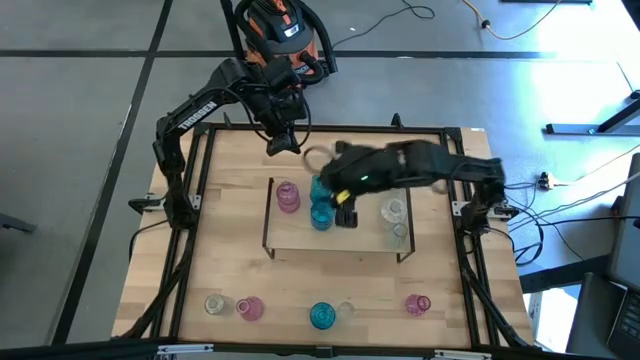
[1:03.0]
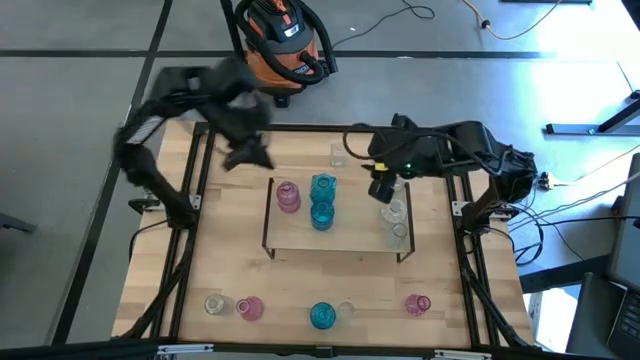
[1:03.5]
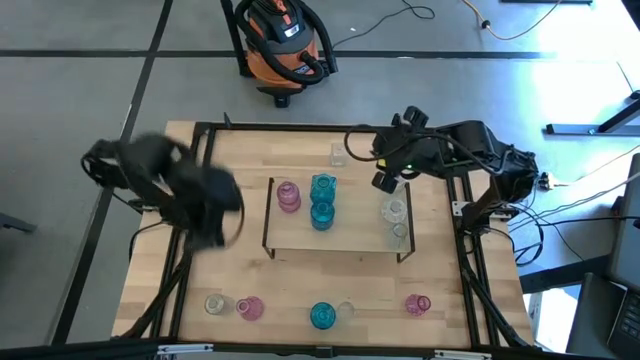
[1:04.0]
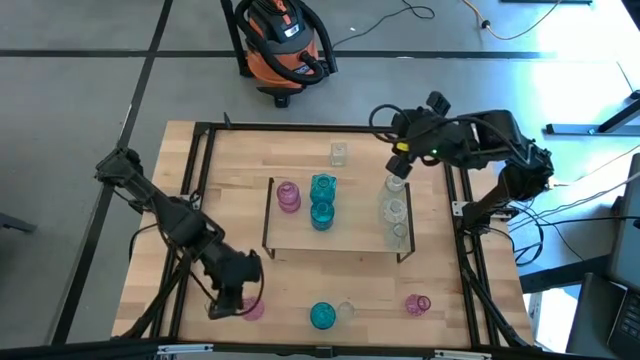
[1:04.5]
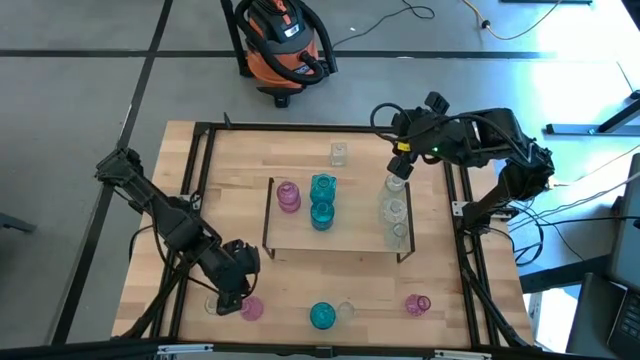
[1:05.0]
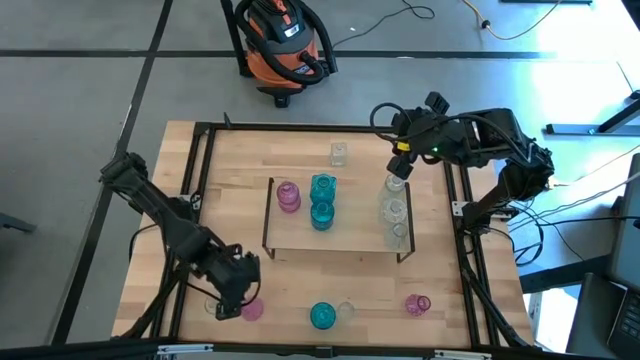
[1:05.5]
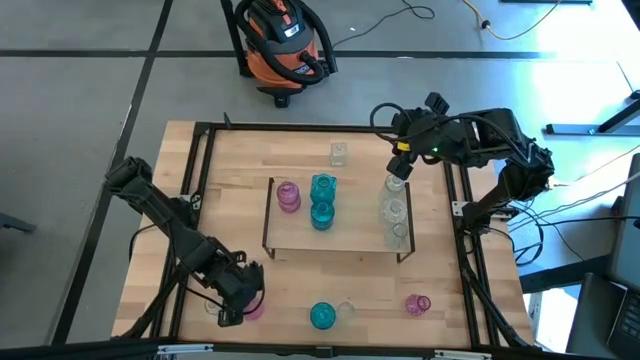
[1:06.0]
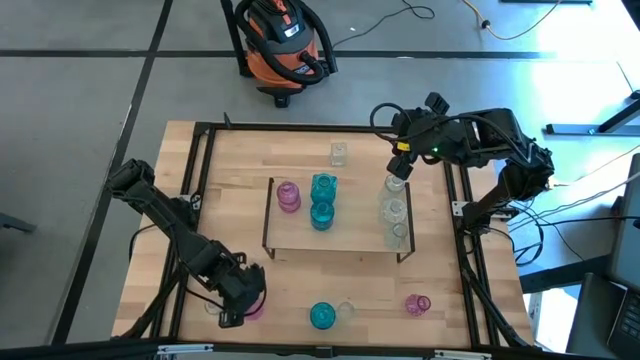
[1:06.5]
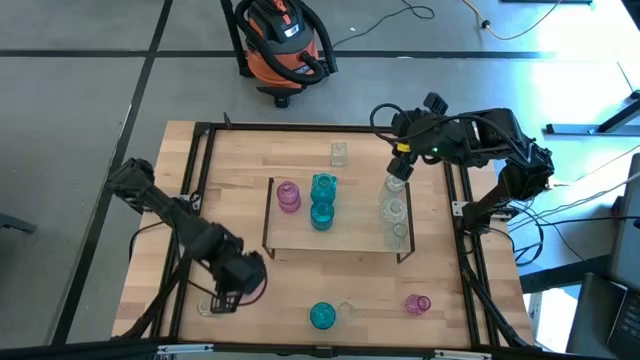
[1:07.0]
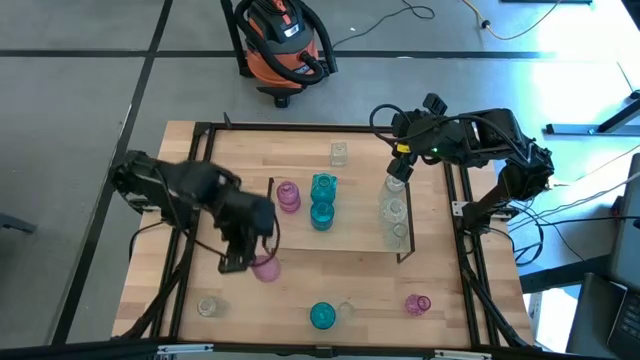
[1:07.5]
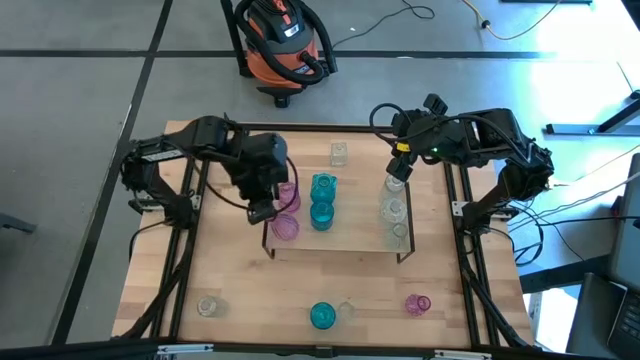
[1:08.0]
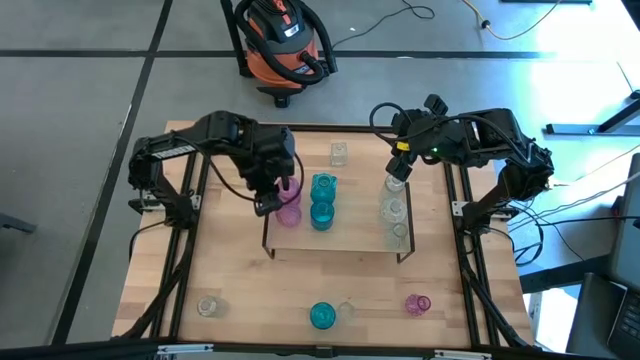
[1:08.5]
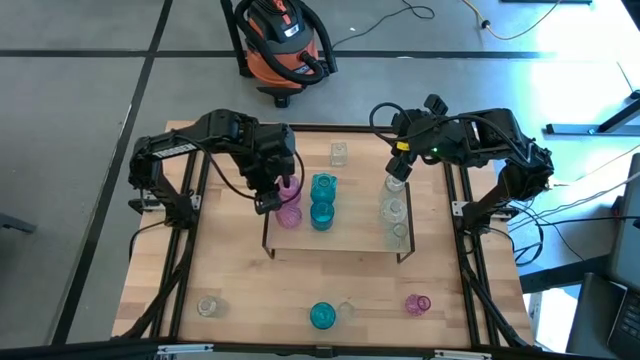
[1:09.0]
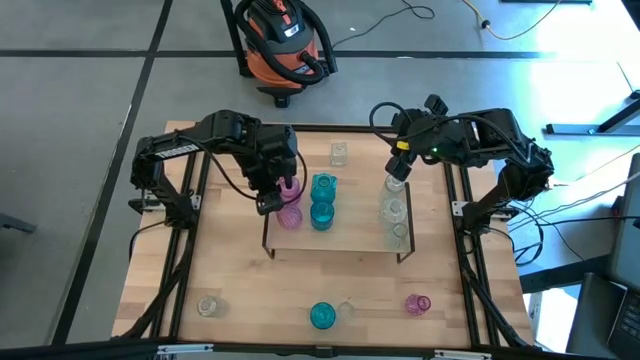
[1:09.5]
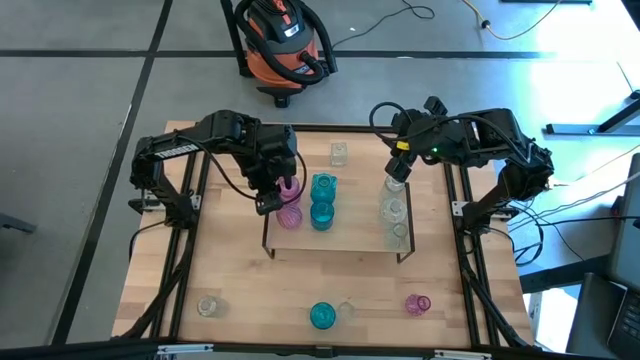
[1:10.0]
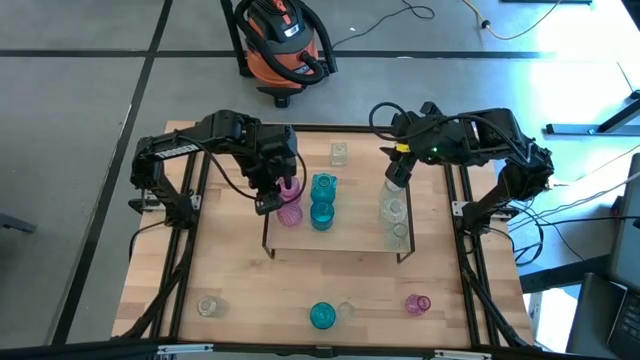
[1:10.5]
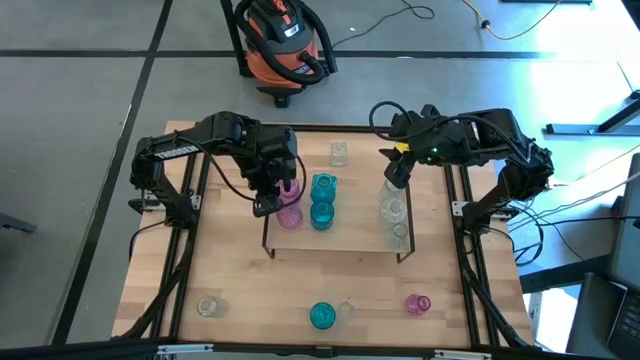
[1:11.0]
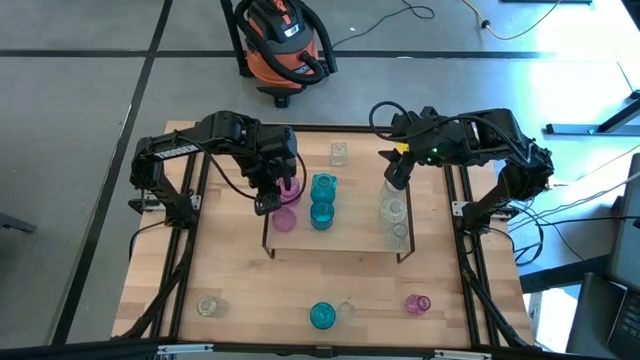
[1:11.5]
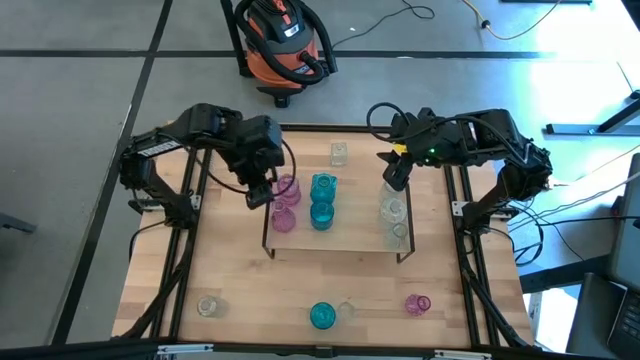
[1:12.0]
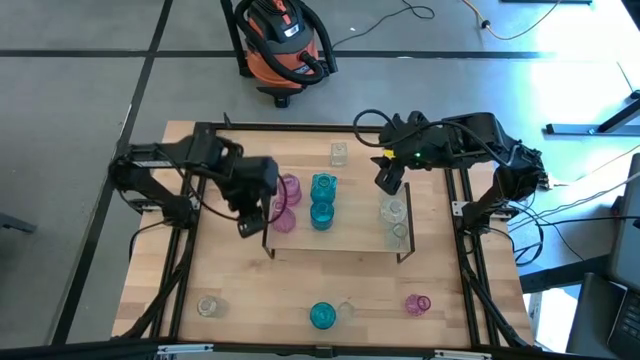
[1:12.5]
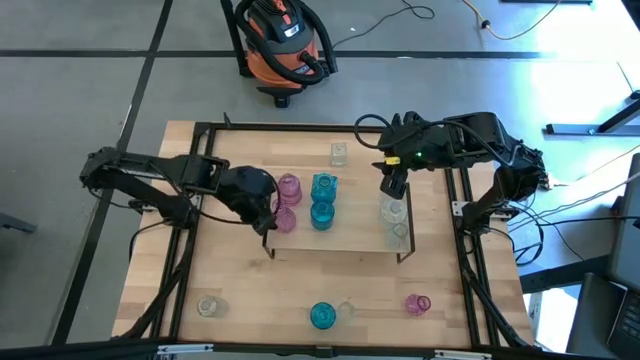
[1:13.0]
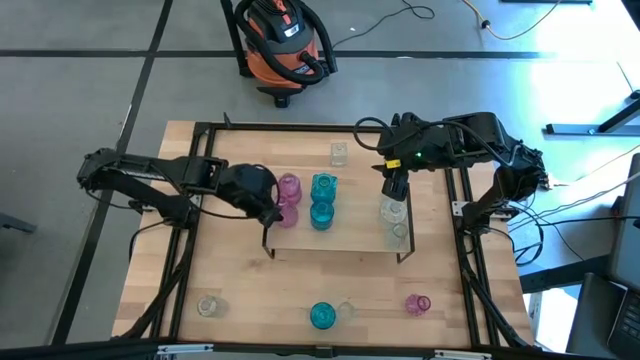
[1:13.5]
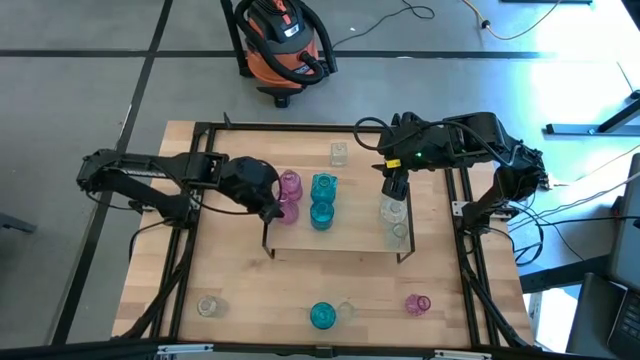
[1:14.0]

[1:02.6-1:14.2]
Task: sort vases onto shelf
Put the violet vase on the shelf aligned with the other violet vase
